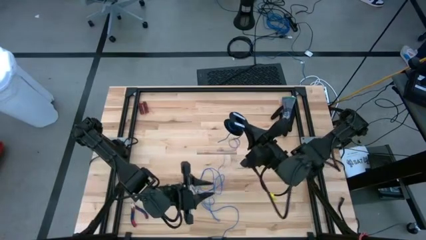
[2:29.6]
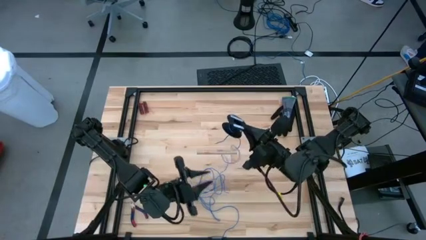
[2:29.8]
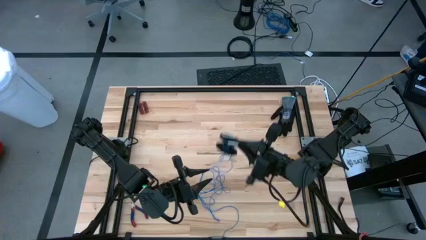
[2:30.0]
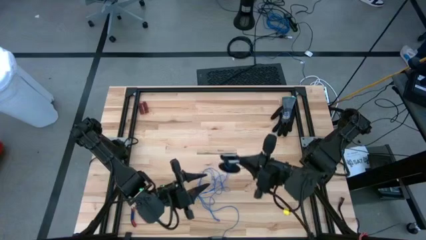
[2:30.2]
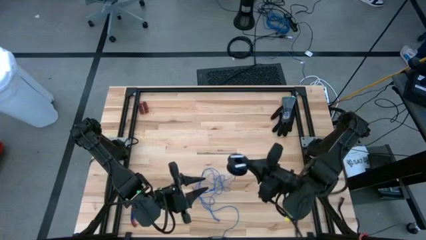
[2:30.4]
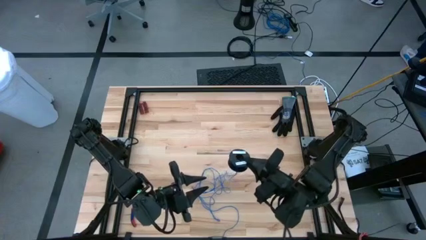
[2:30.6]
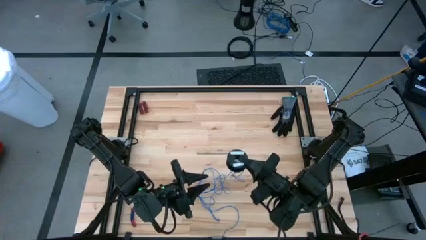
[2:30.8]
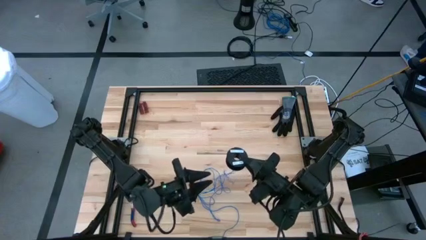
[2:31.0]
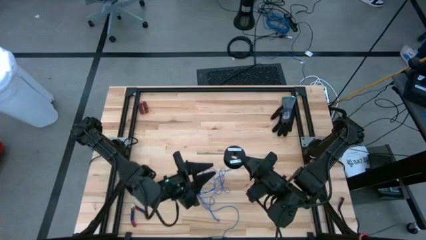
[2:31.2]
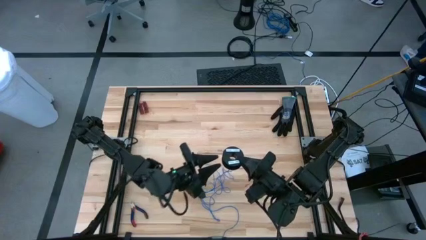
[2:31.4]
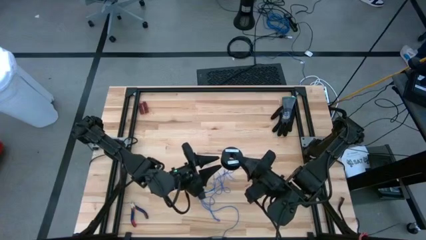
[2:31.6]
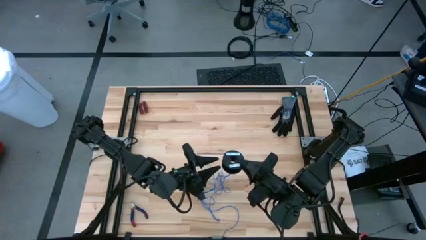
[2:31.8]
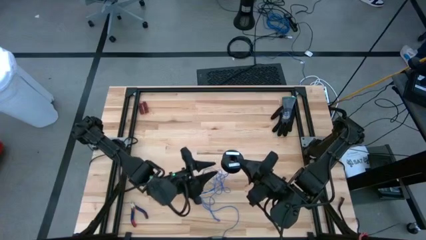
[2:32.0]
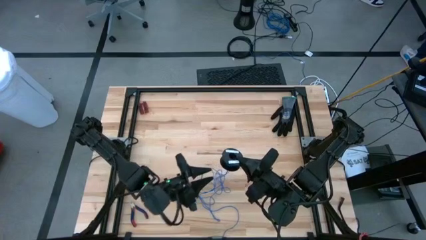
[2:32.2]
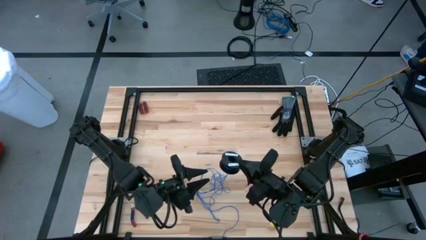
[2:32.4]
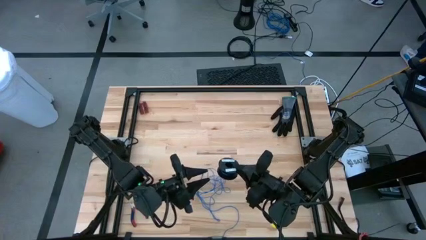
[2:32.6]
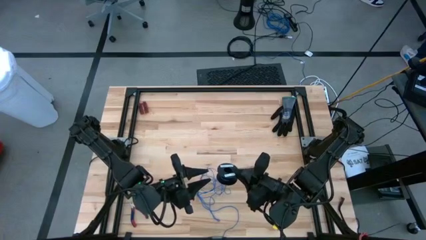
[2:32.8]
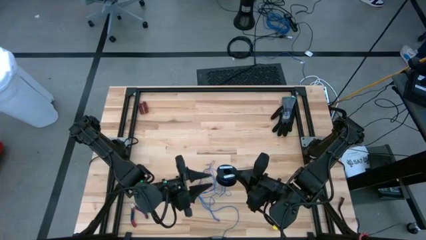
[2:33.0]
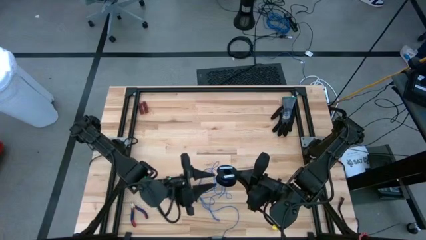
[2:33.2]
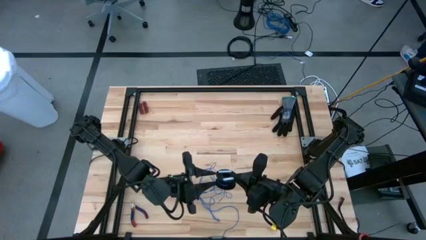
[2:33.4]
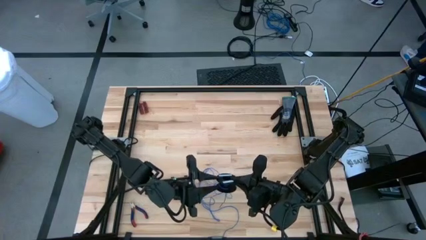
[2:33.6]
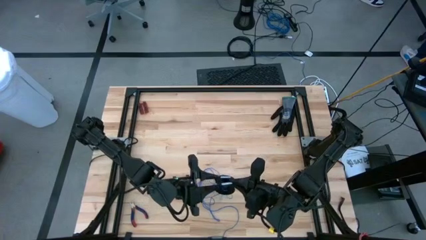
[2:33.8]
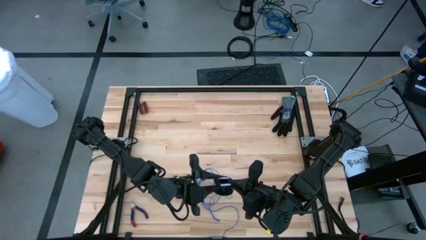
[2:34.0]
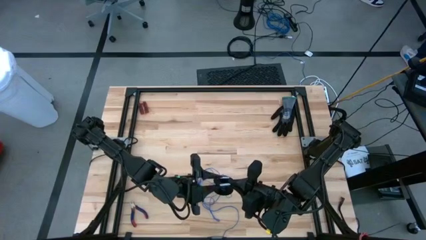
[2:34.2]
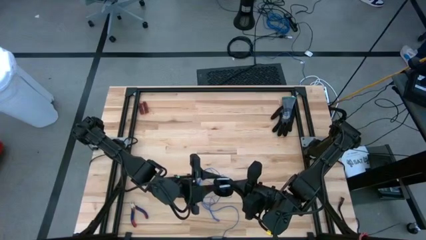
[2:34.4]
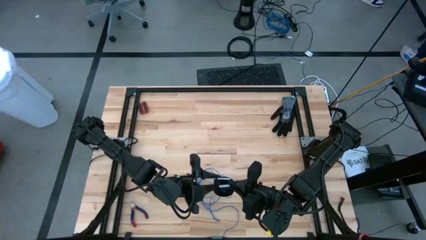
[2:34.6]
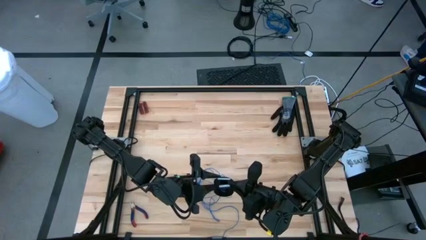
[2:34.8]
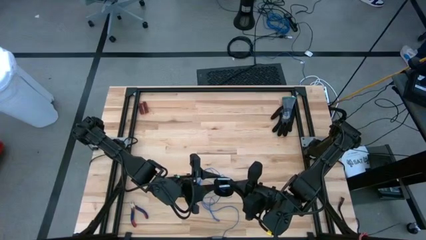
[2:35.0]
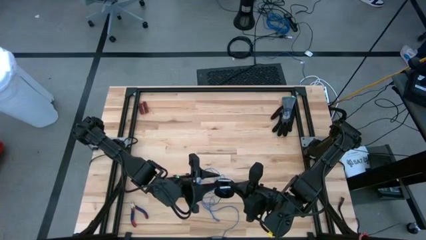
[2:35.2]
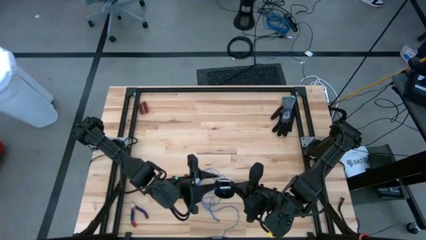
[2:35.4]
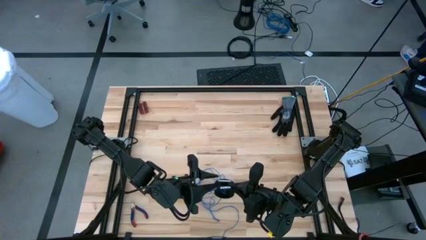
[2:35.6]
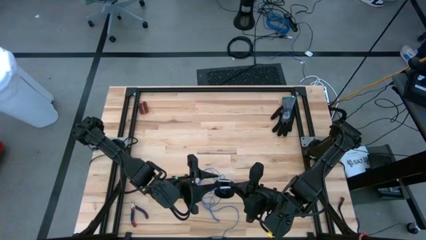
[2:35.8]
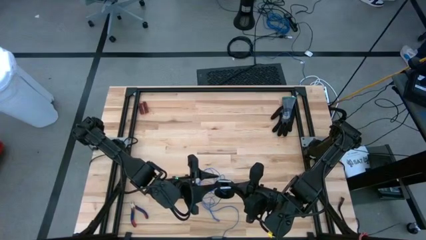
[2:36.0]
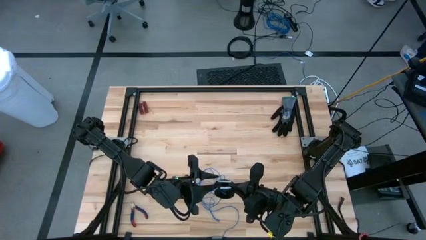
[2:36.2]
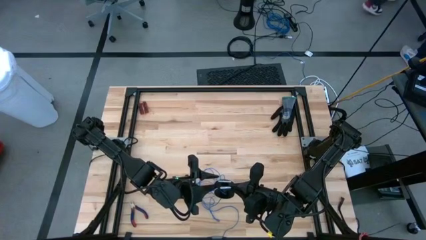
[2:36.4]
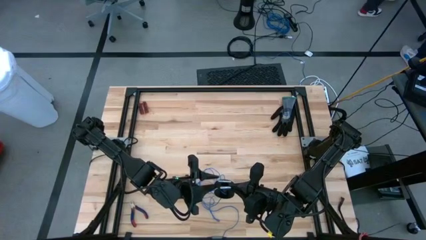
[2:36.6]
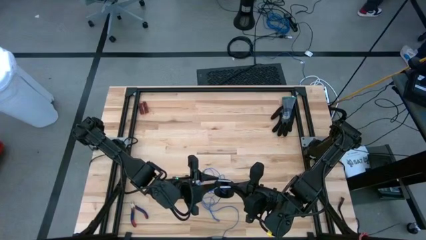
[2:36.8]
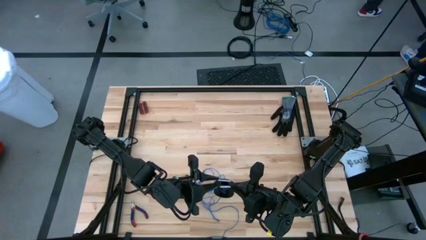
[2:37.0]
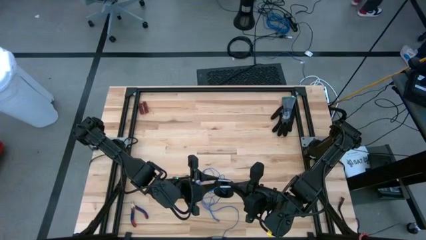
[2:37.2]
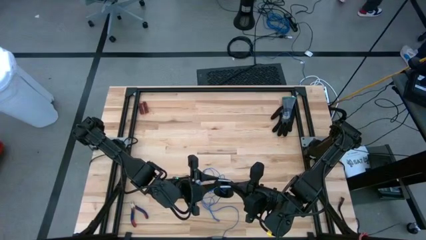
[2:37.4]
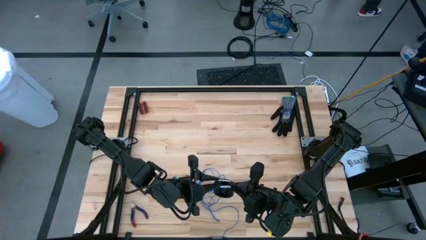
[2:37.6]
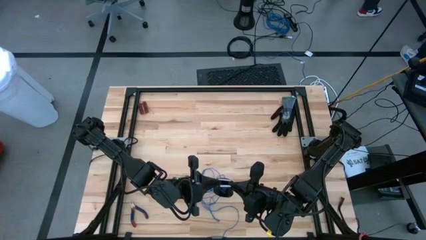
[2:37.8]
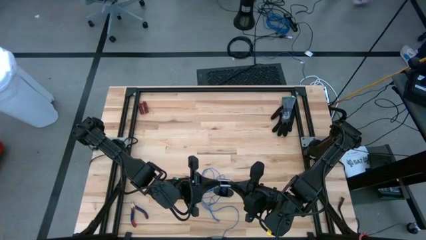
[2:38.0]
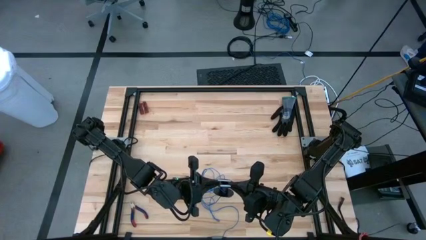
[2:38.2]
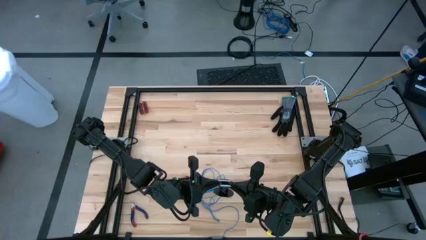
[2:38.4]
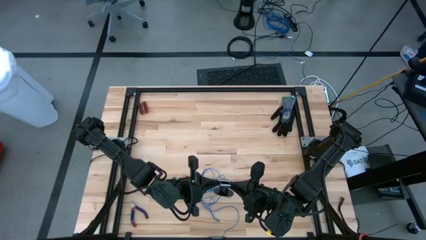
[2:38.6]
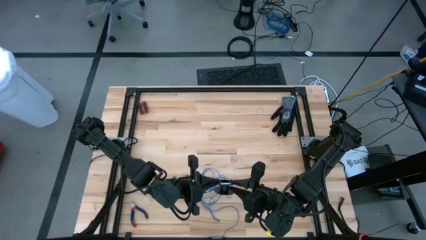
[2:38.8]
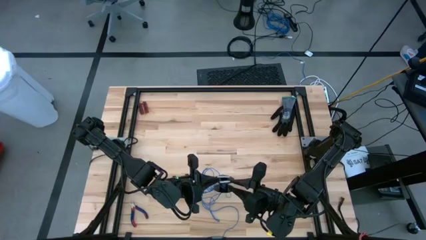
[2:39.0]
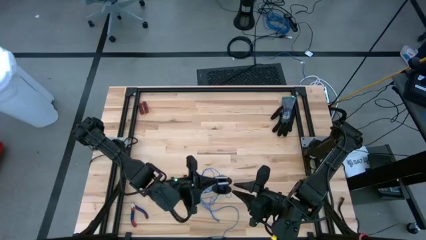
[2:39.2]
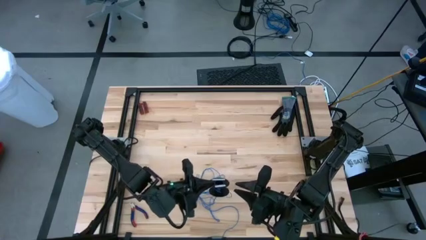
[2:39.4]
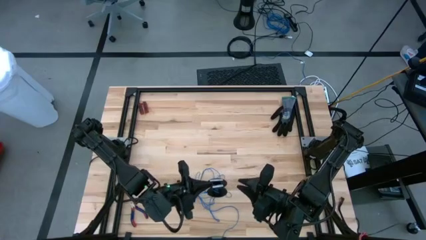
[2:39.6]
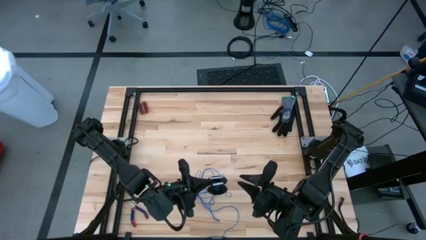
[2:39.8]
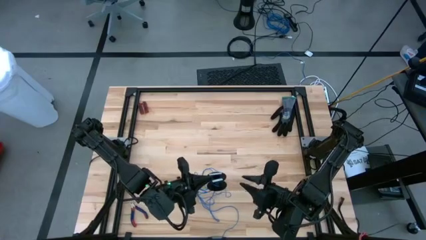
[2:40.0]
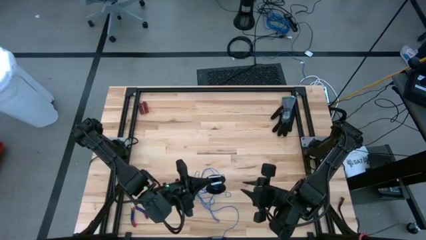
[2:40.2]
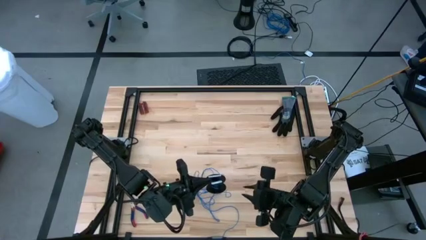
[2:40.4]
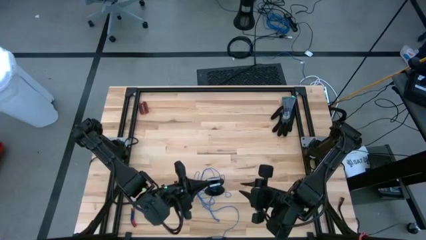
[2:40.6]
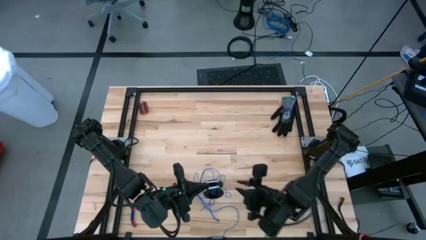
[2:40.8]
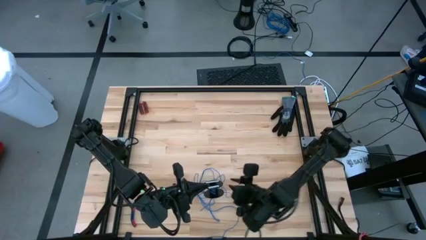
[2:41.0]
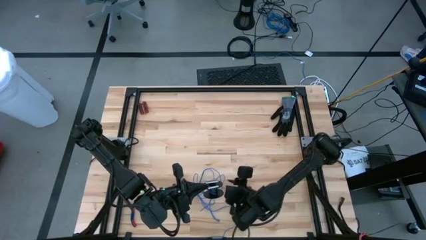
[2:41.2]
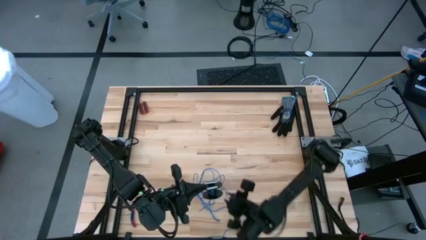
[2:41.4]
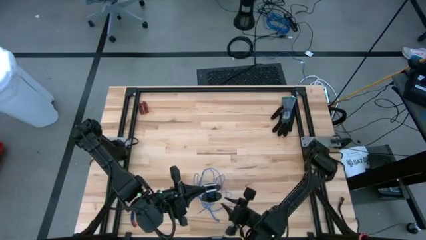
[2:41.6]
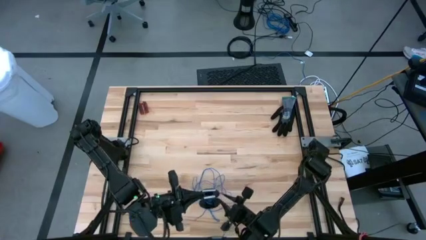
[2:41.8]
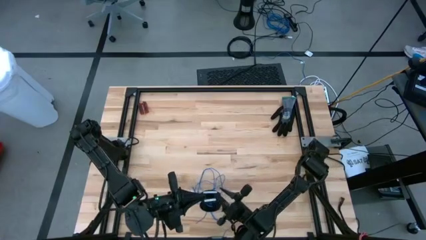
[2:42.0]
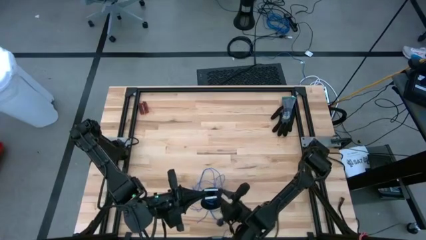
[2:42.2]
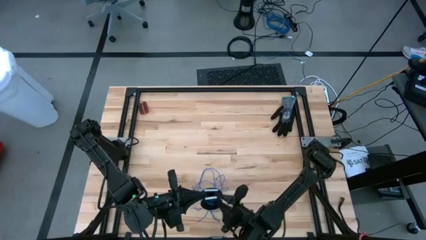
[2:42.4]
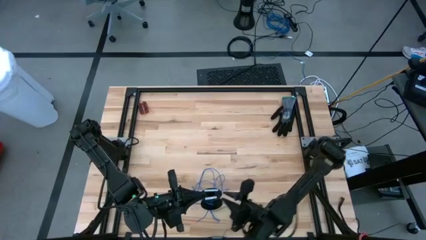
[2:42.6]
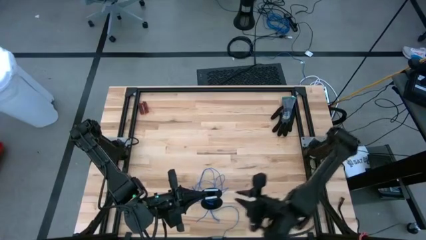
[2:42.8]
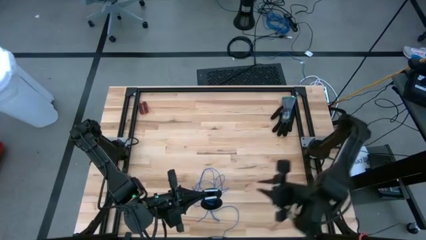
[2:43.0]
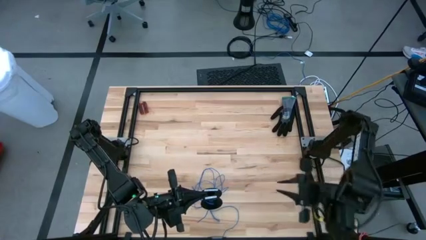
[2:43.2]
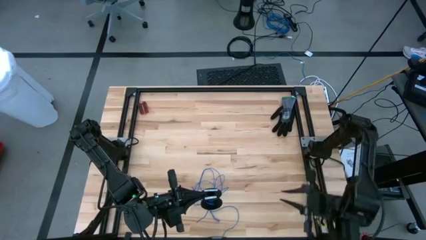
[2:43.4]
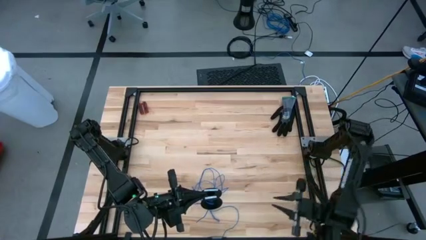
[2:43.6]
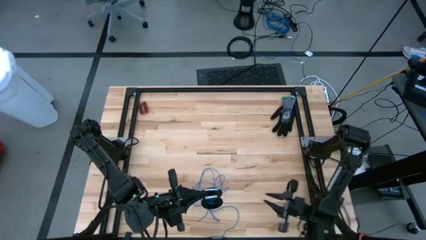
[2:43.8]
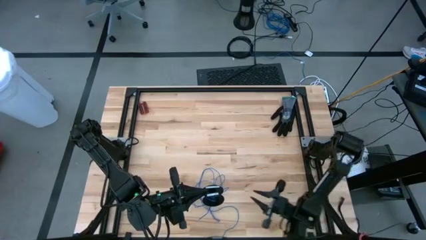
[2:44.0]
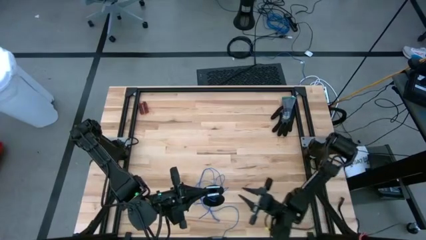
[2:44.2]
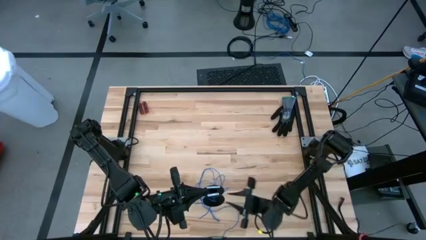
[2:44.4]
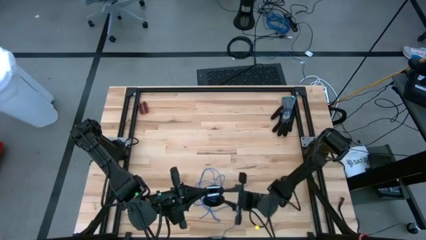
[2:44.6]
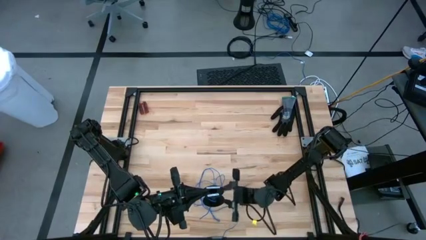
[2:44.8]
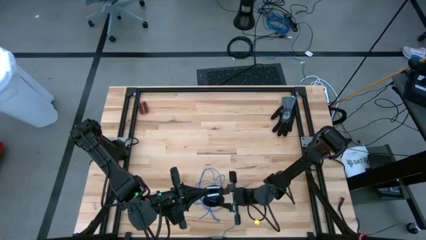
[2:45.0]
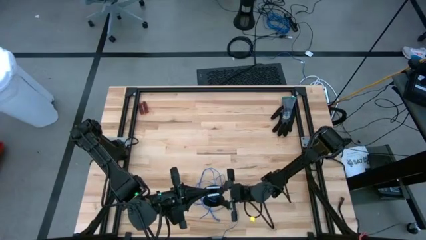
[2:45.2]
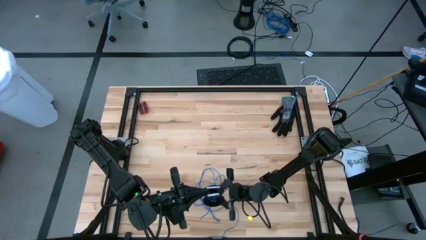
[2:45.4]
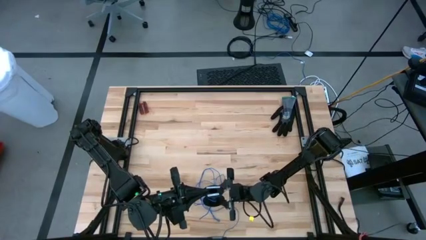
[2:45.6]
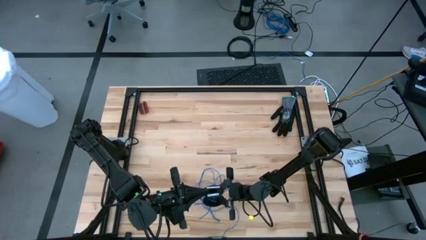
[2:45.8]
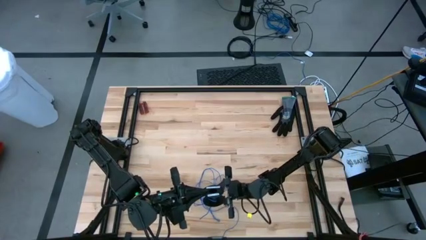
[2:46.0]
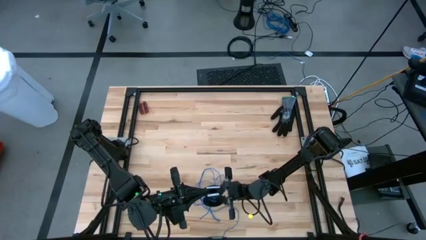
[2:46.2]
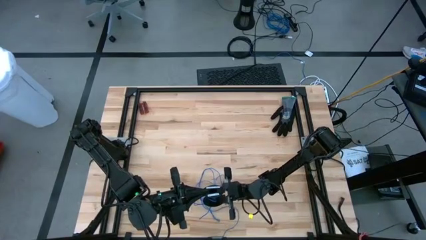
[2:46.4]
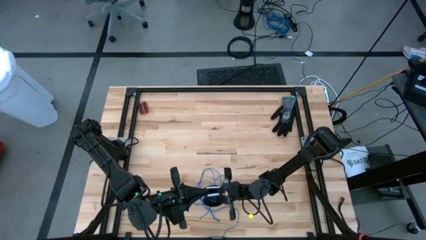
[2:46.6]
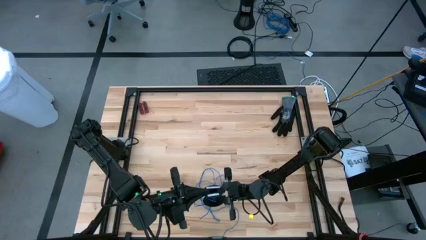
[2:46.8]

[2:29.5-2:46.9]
Task: Coil cords
Coil the blue wire onto a spool
